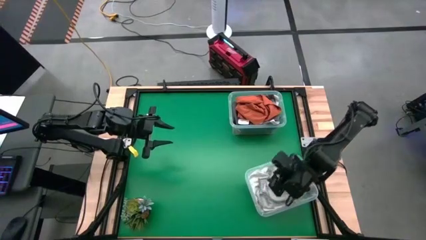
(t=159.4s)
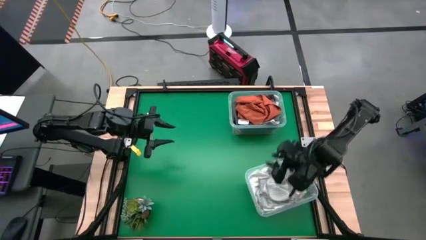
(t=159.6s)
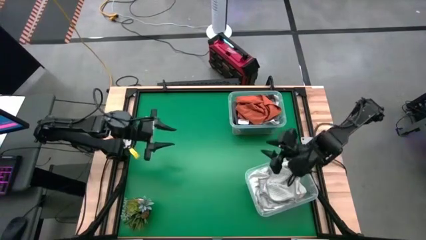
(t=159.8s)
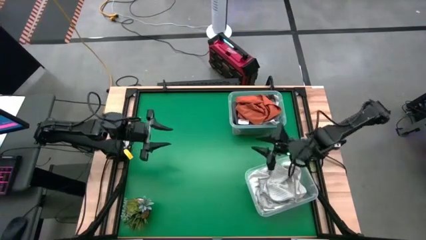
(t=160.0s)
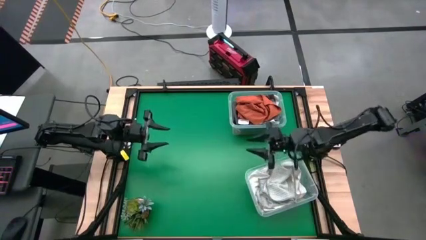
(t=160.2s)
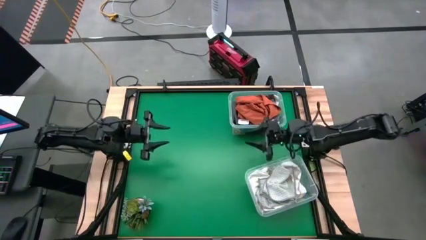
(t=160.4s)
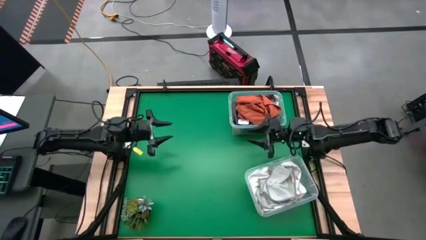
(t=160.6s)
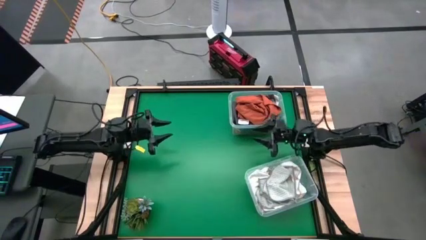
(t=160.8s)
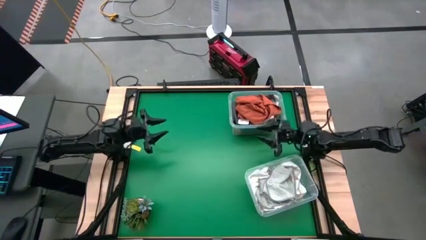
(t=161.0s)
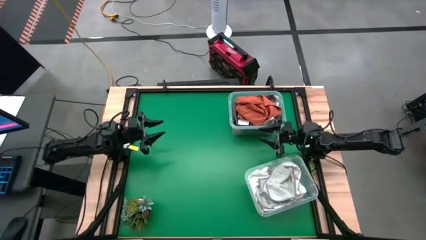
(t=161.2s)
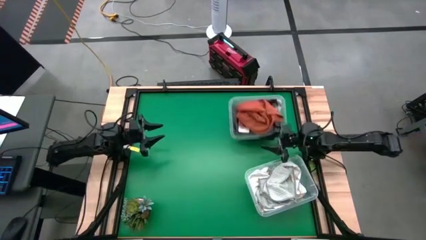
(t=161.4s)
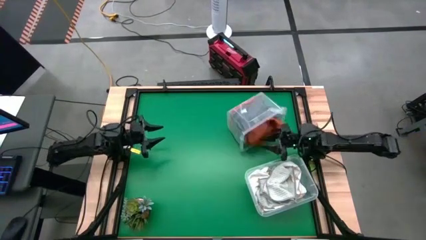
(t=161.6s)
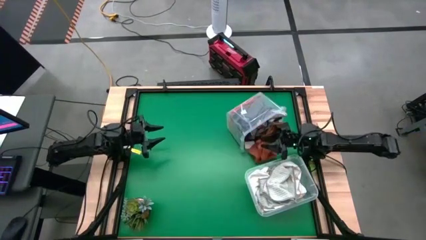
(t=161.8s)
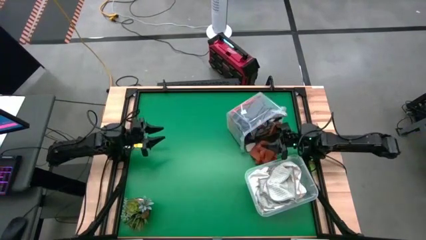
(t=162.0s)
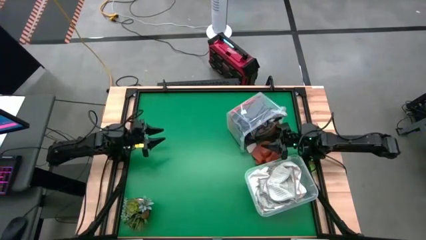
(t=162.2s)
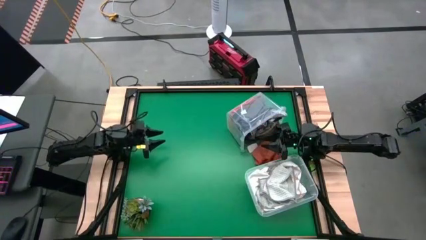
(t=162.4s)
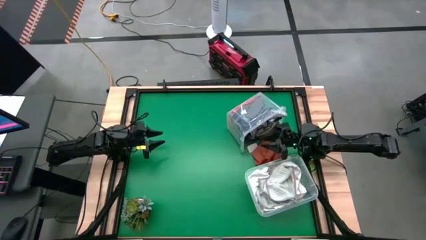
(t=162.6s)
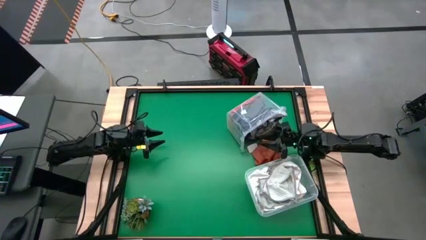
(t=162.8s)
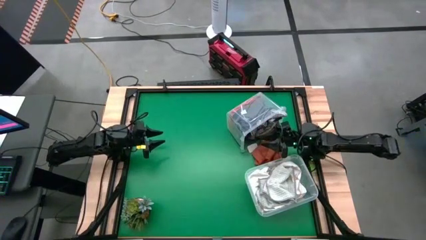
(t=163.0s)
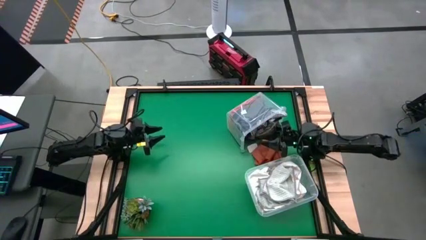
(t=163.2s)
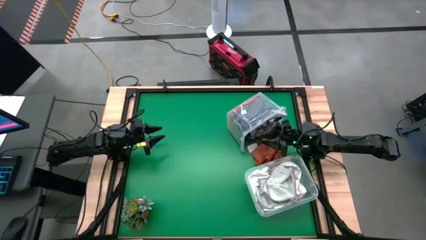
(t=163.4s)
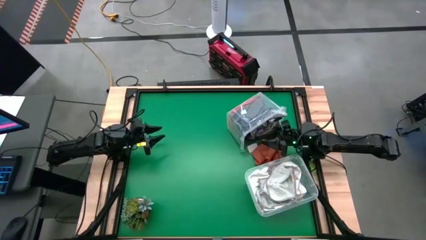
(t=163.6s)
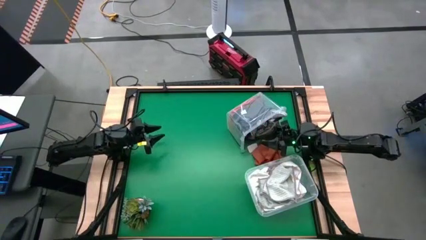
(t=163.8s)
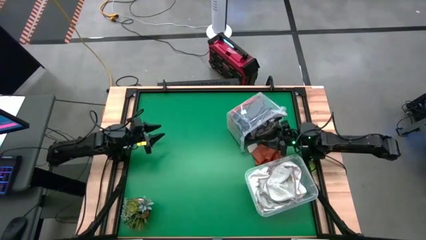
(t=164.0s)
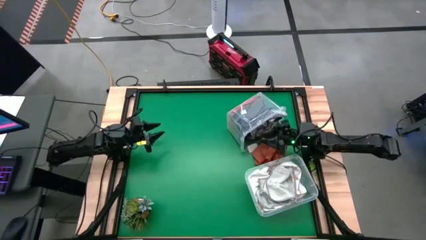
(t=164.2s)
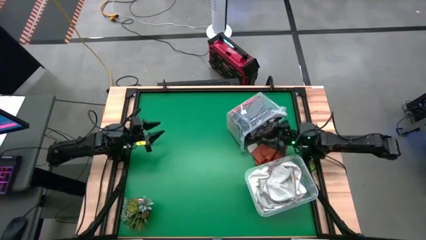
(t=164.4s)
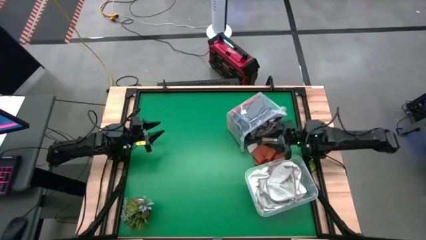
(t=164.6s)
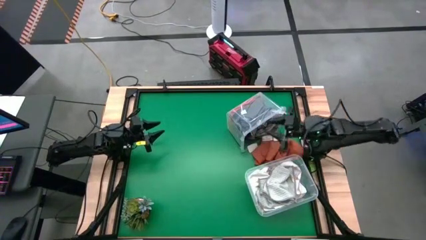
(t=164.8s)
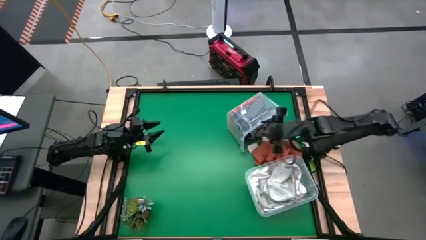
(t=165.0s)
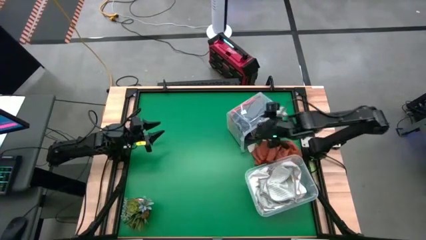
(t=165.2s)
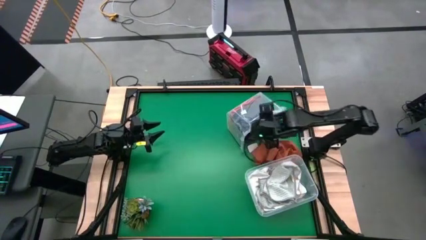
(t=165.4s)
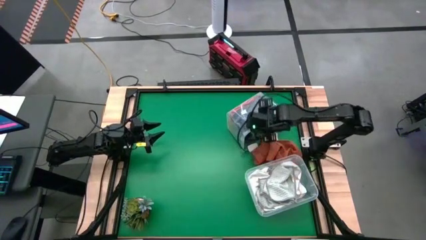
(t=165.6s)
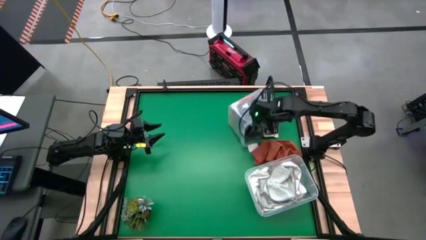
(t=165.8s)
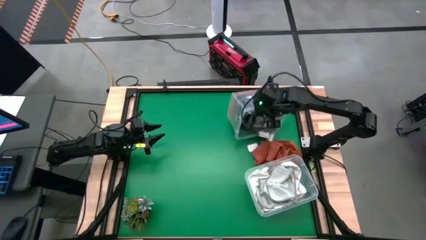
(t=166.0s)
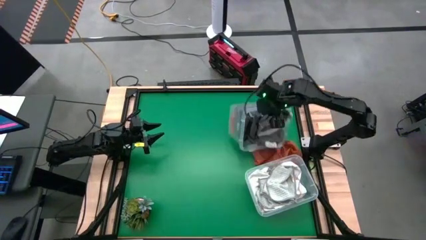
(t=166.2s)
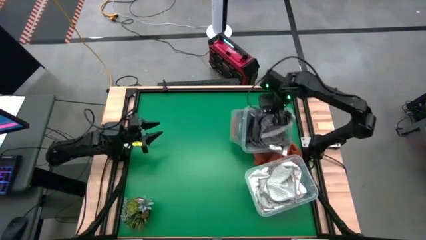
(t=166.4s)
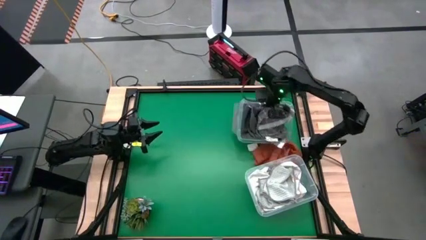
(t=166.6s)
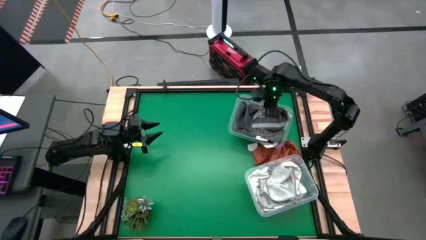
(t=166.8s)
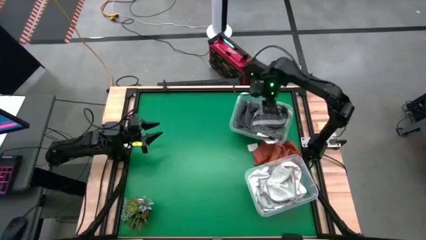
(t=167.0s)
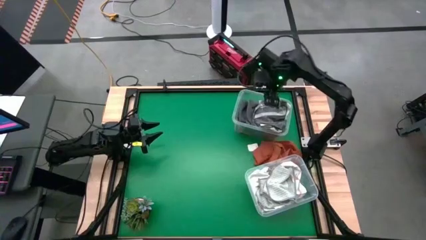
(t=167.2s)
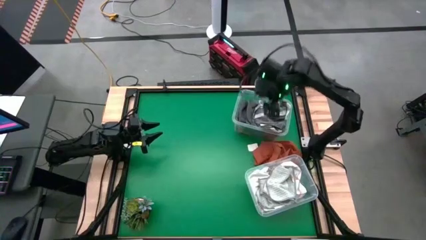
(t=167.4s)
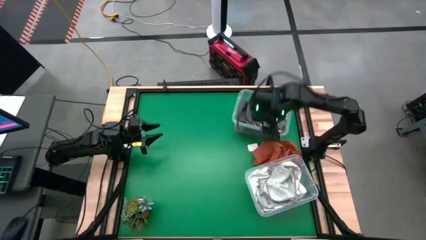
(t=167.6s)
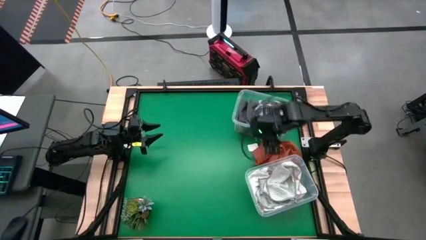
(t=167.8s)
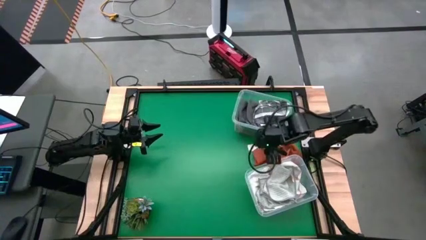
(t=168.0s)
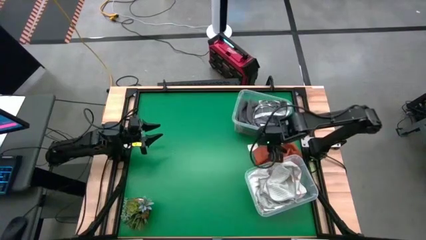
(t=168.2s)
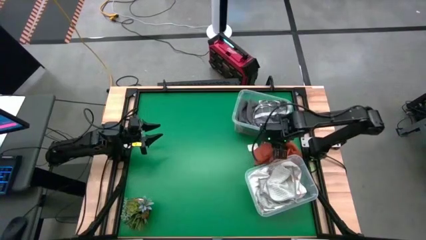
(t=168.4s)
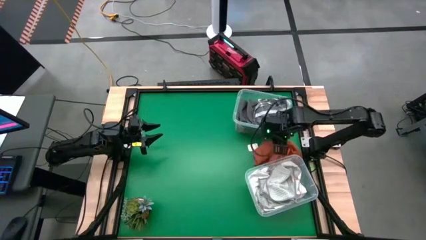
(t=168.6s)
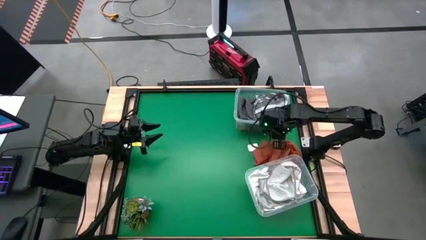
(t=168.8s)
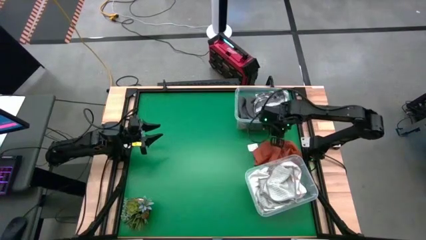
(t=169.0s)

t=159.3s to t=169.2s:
Task: Sort towels by color in basket
Adjust the top transparent bin

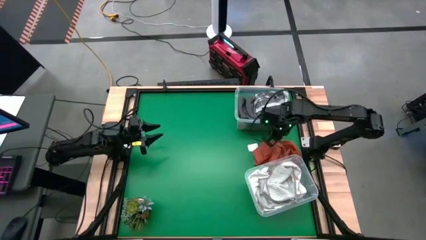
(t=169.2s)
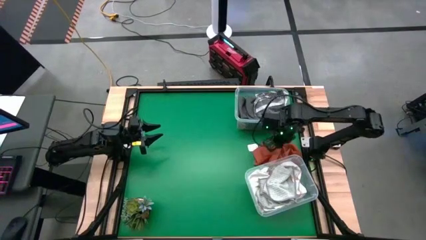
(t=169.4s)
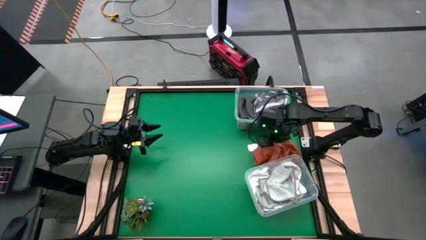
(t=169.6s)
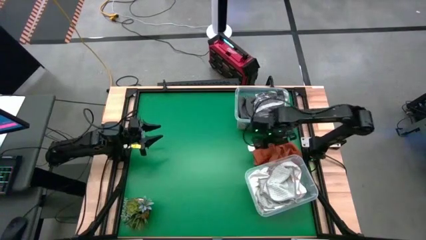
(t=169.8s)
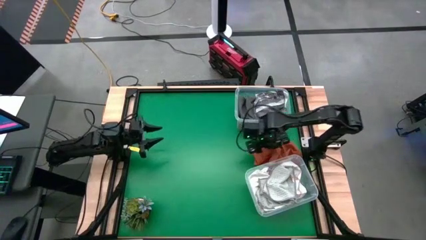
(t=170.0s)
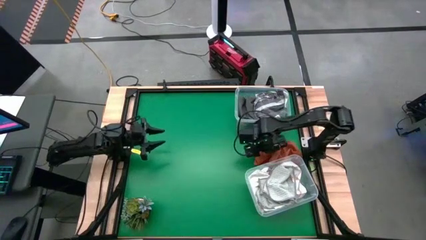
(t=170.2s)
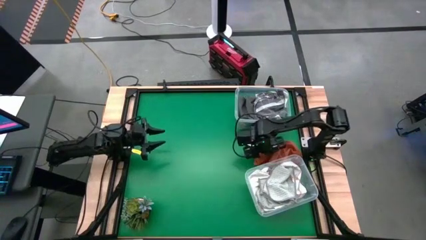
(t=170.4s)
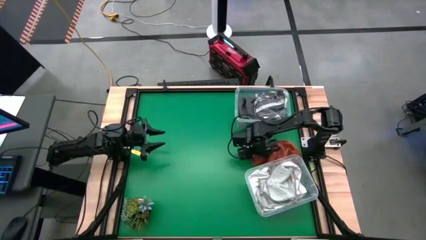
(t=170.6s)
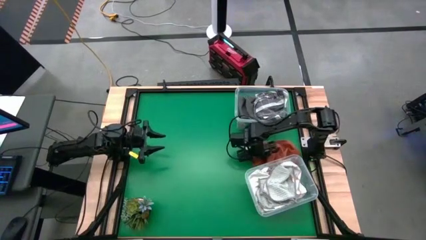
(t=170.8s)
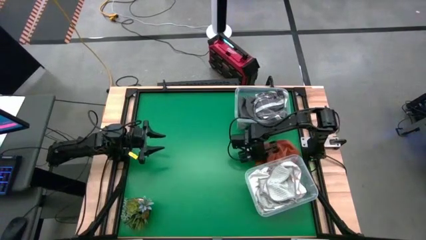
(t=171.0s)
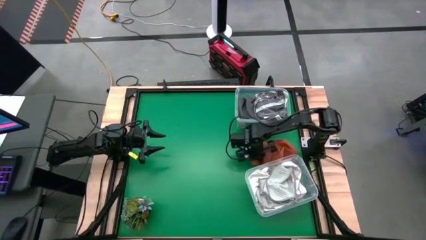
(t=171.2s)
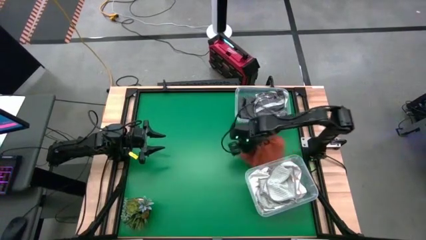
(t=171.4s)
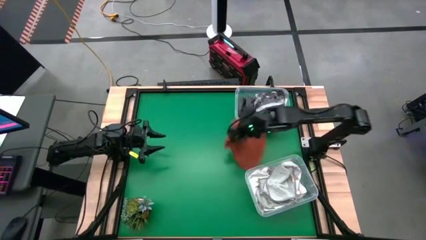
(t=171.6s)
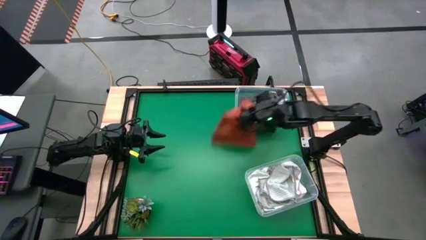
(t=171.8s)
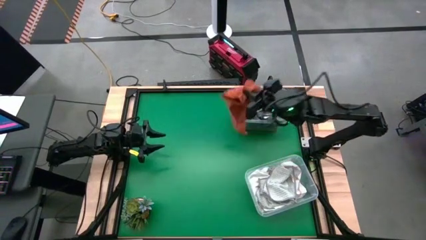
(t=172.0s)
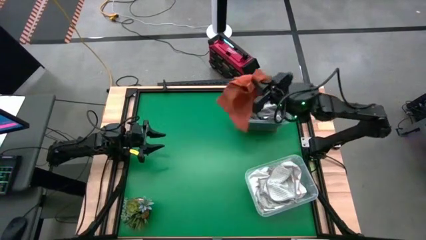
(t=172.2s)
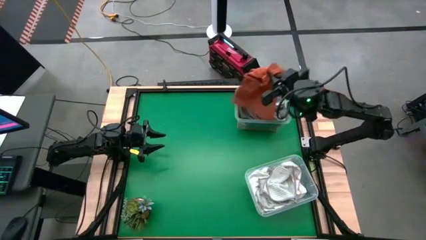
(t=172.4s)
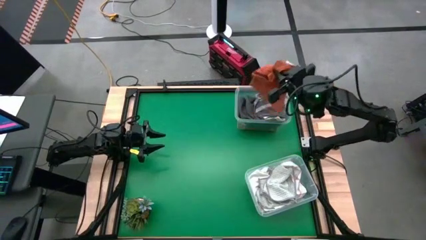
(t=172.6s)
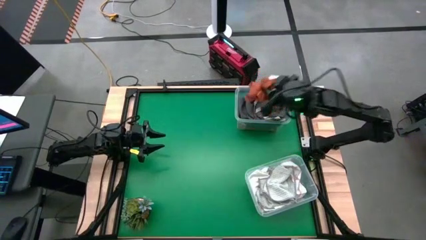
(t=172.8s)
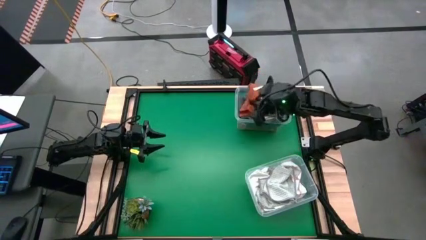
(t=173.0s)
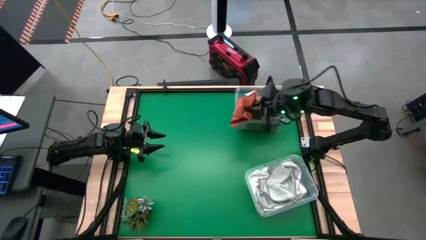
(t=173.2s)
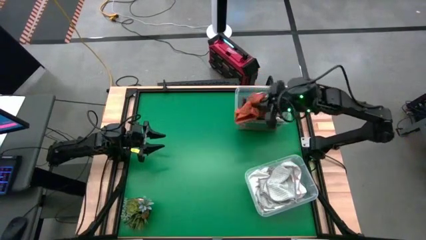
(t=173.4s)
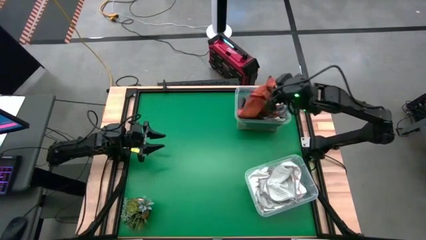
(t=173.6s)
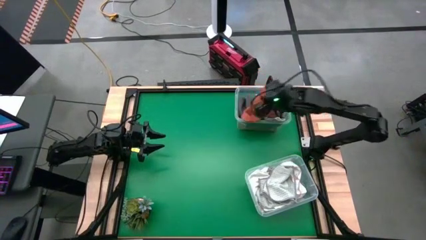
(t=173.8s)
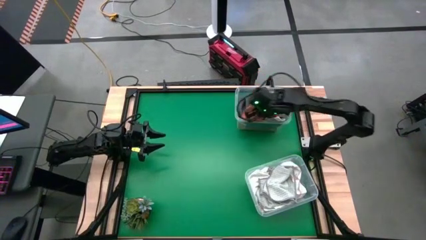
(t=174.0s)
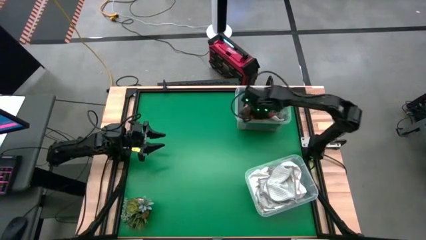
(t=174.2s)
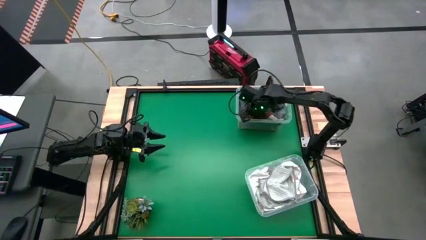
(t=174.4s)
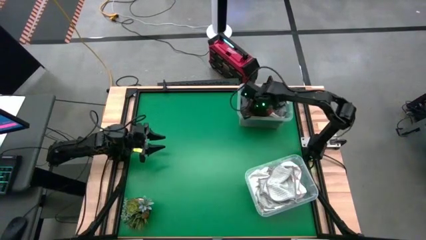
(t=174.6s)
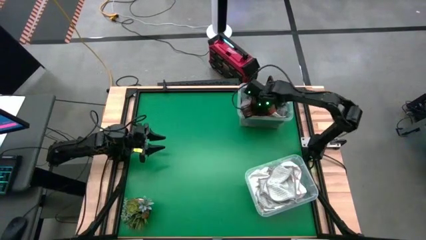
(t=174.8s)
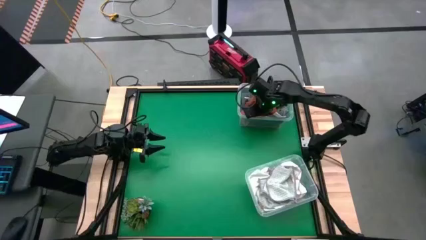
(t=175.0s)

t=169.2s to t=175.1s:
Put the orange towel into the top transparent bin
